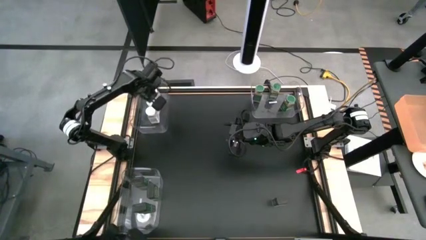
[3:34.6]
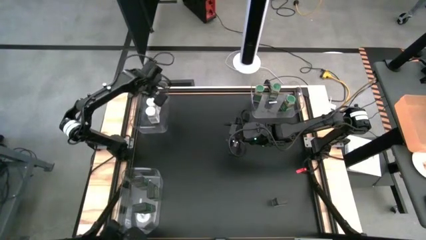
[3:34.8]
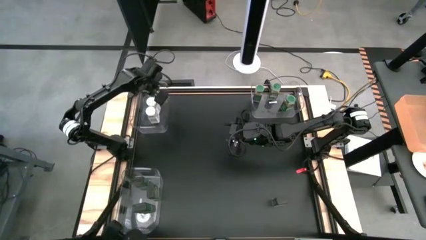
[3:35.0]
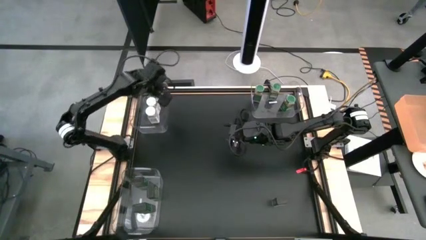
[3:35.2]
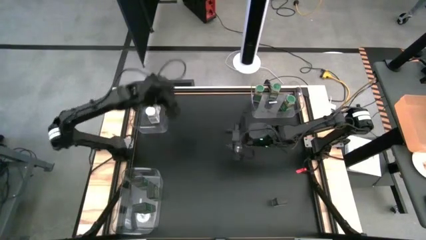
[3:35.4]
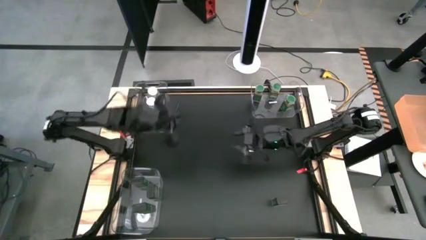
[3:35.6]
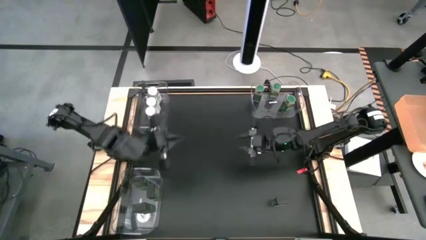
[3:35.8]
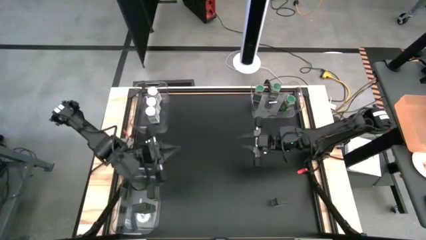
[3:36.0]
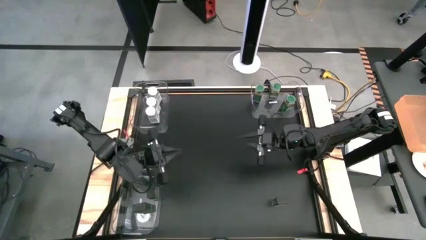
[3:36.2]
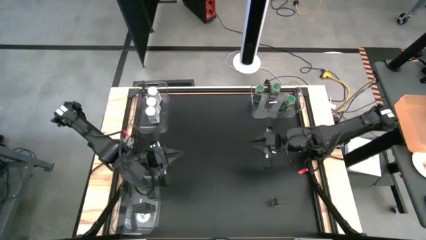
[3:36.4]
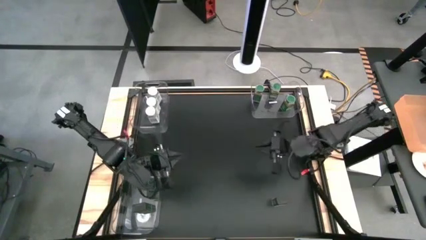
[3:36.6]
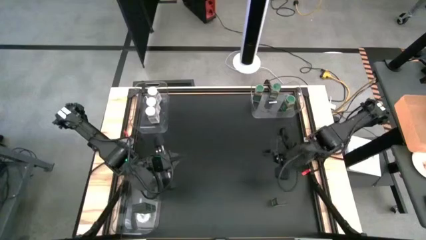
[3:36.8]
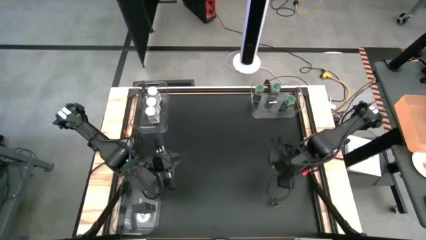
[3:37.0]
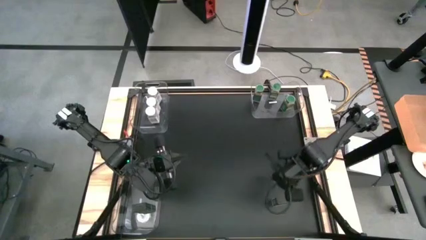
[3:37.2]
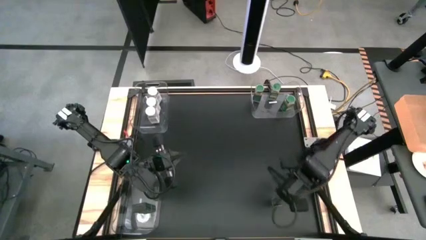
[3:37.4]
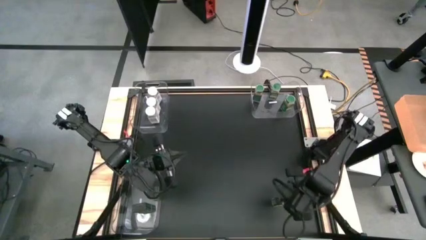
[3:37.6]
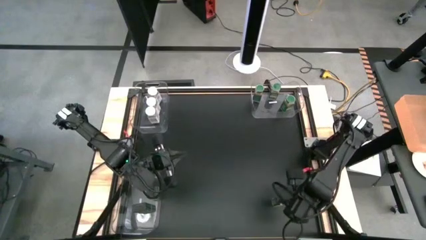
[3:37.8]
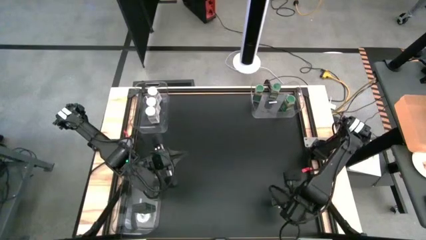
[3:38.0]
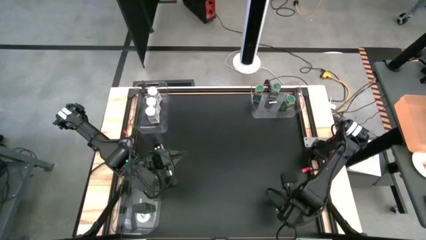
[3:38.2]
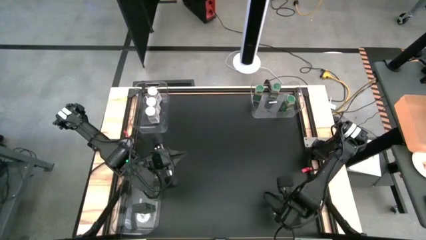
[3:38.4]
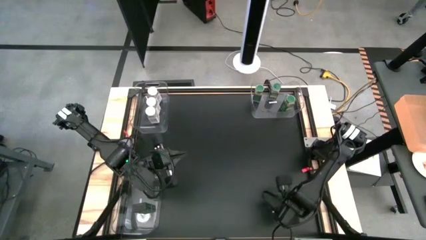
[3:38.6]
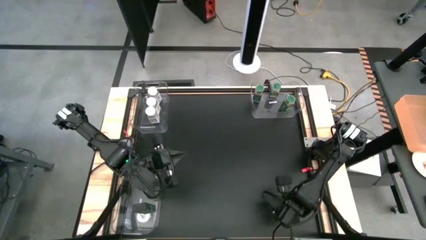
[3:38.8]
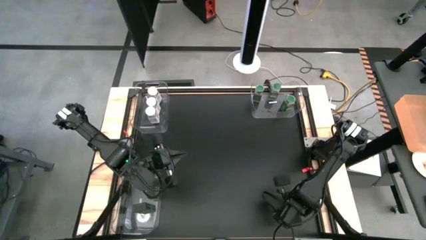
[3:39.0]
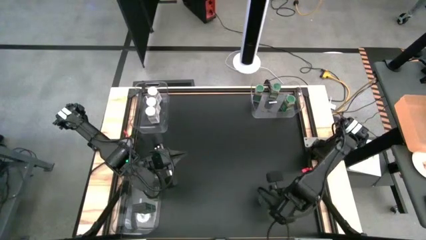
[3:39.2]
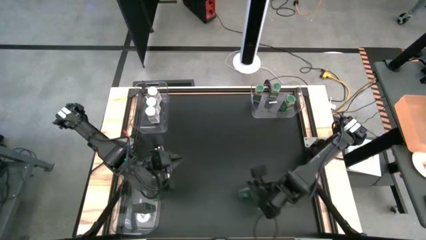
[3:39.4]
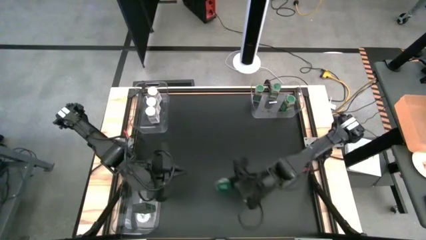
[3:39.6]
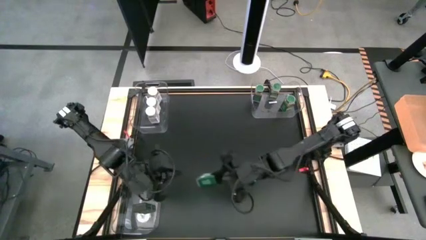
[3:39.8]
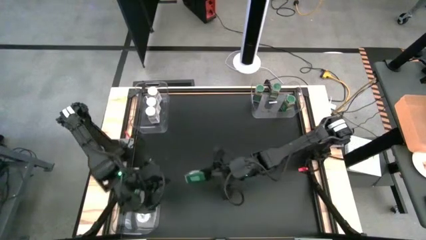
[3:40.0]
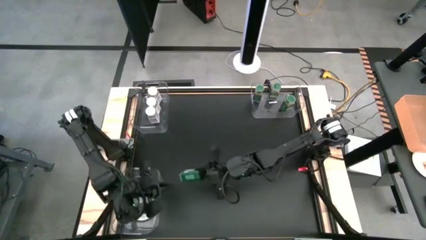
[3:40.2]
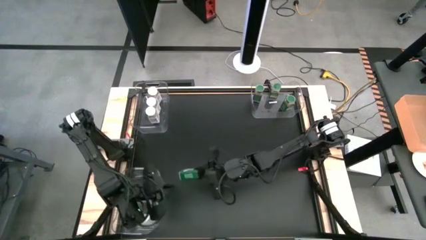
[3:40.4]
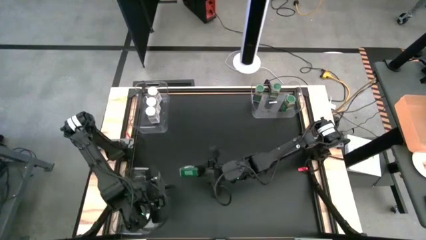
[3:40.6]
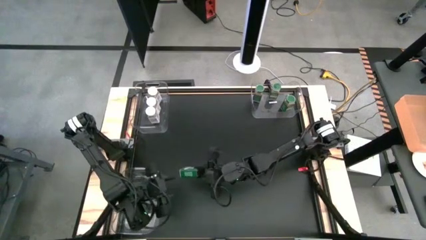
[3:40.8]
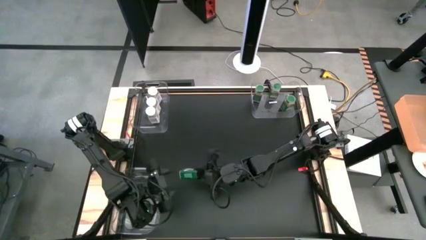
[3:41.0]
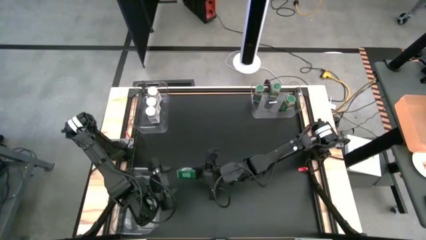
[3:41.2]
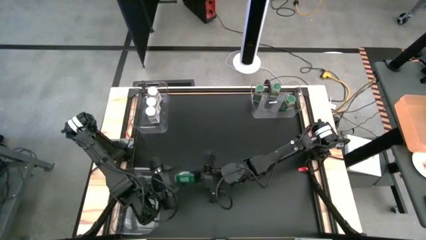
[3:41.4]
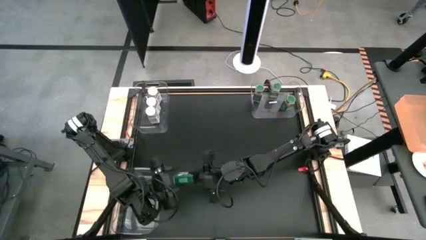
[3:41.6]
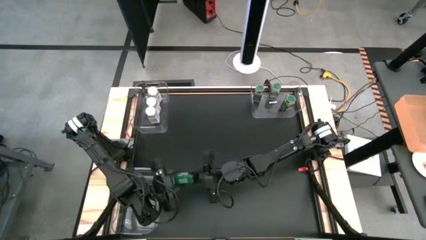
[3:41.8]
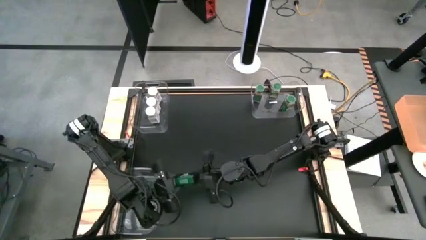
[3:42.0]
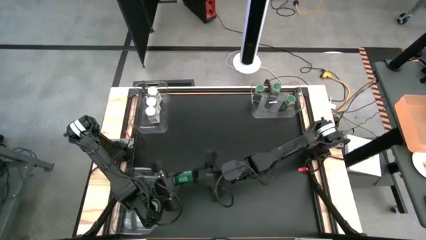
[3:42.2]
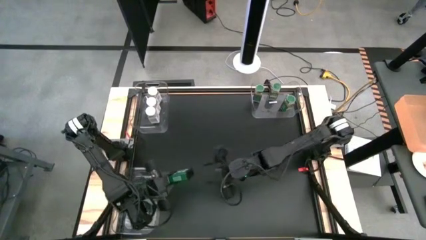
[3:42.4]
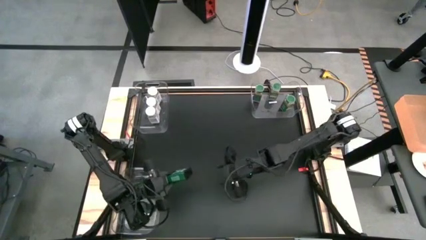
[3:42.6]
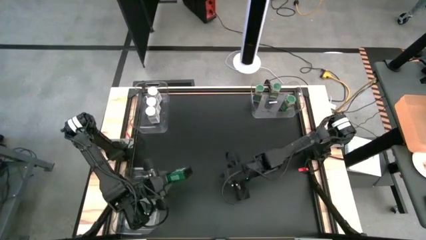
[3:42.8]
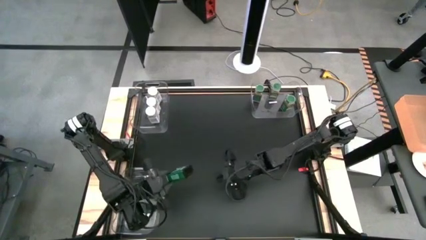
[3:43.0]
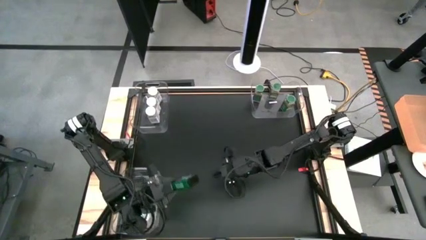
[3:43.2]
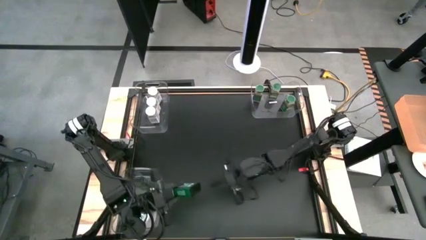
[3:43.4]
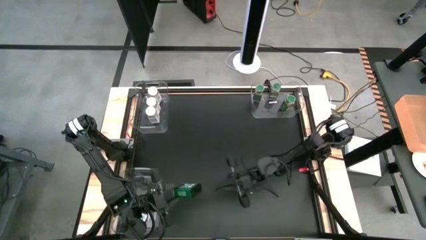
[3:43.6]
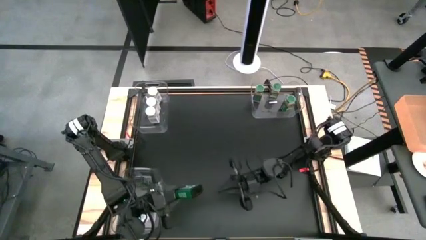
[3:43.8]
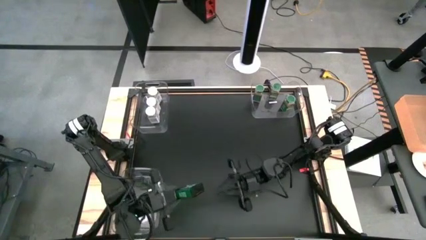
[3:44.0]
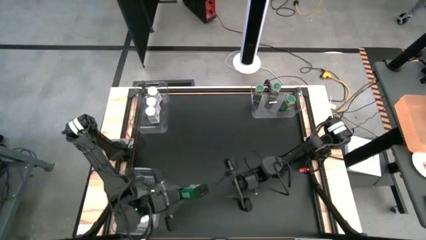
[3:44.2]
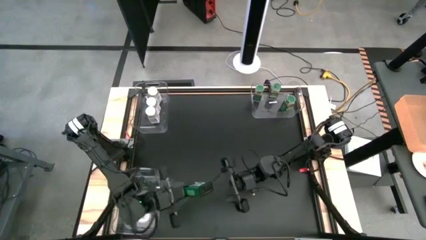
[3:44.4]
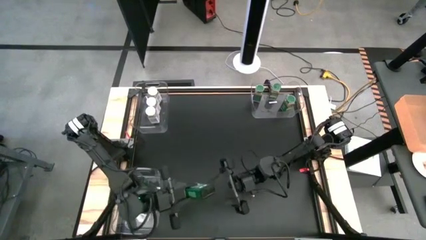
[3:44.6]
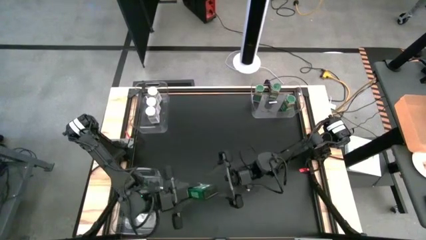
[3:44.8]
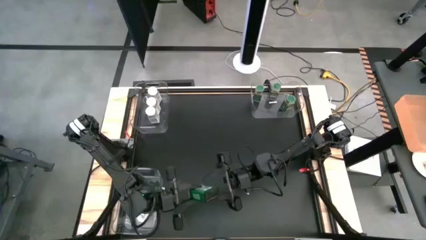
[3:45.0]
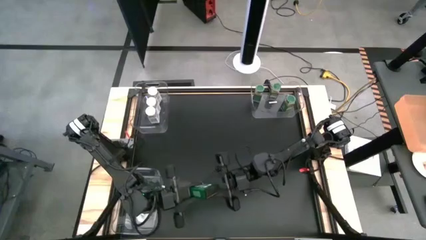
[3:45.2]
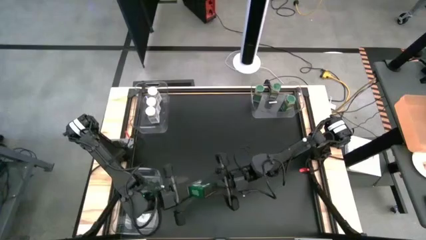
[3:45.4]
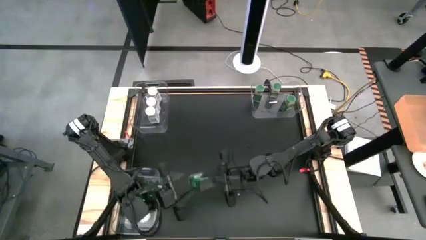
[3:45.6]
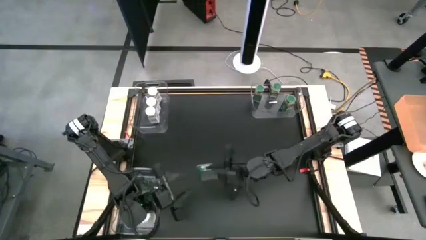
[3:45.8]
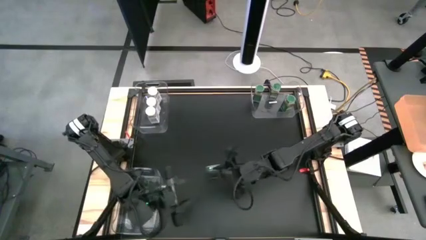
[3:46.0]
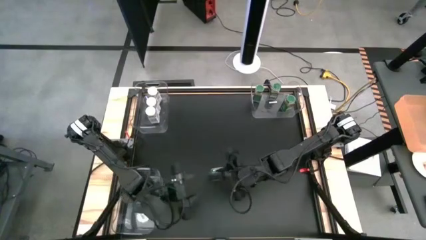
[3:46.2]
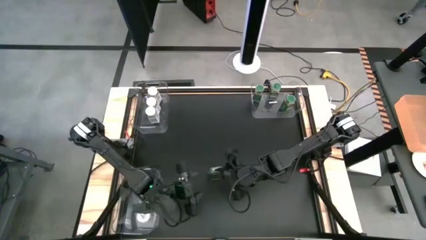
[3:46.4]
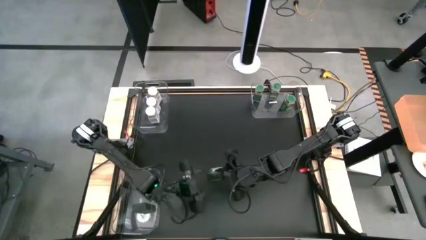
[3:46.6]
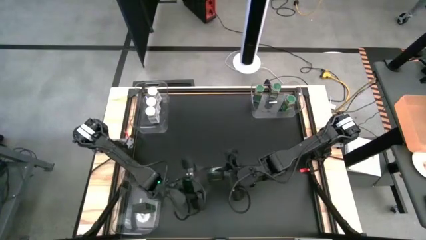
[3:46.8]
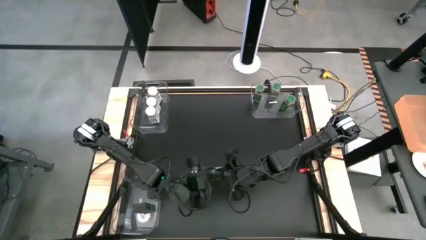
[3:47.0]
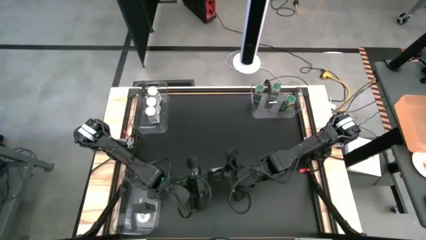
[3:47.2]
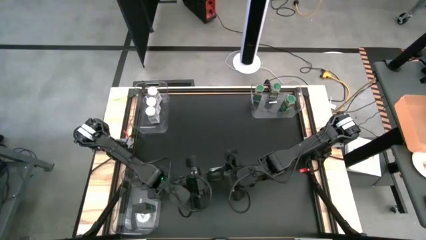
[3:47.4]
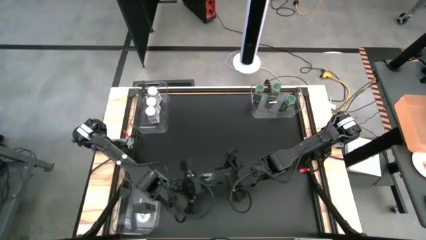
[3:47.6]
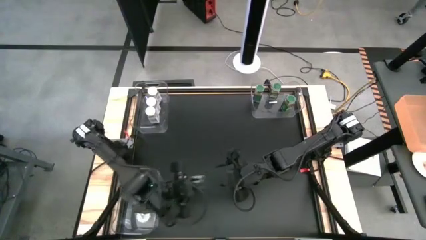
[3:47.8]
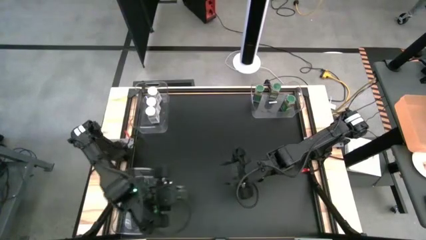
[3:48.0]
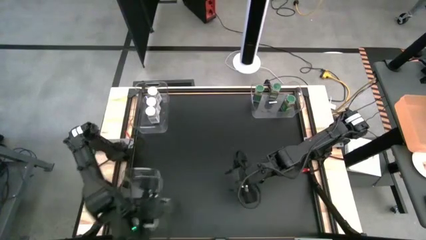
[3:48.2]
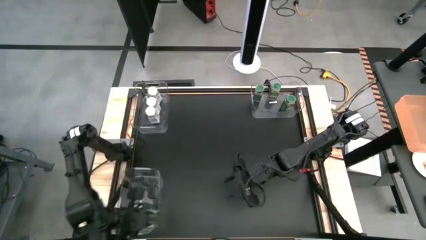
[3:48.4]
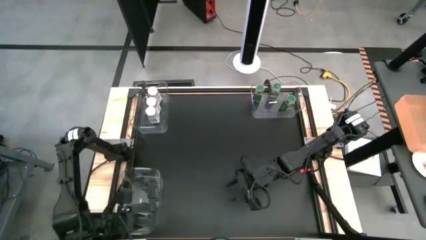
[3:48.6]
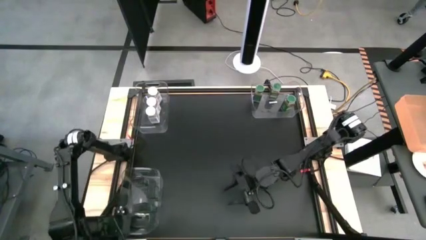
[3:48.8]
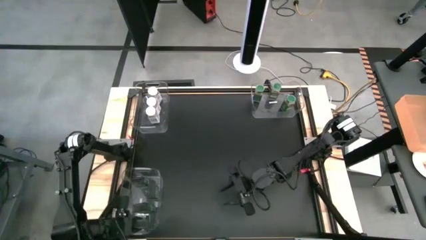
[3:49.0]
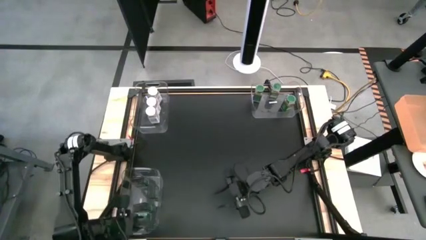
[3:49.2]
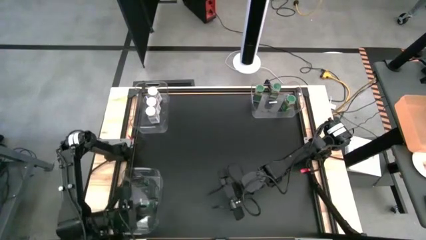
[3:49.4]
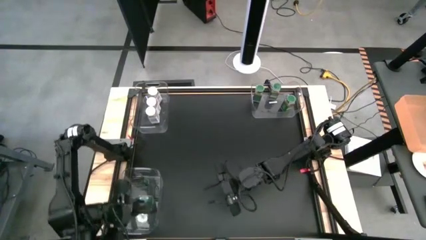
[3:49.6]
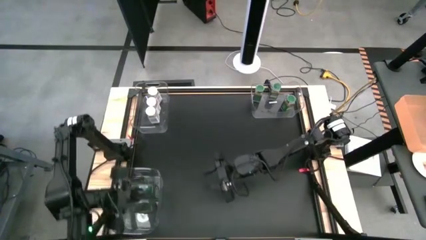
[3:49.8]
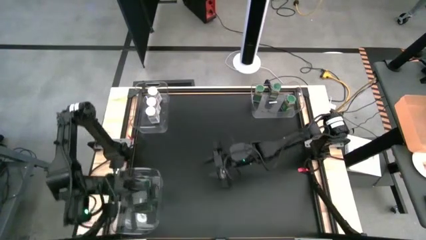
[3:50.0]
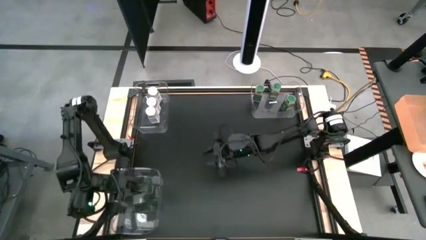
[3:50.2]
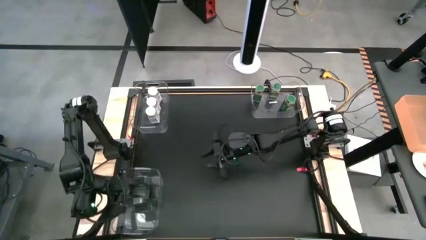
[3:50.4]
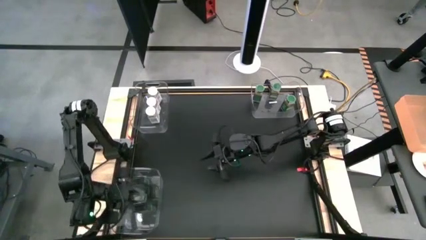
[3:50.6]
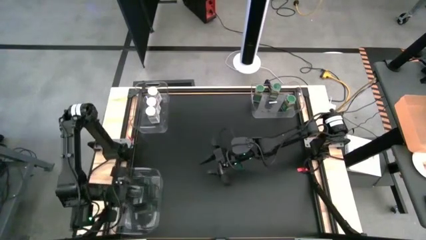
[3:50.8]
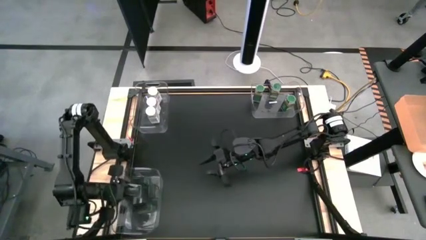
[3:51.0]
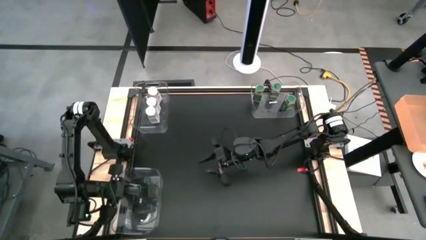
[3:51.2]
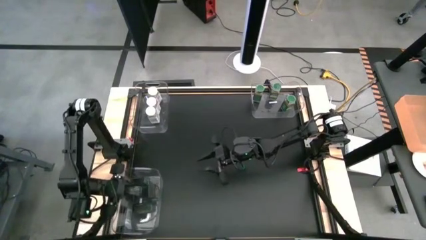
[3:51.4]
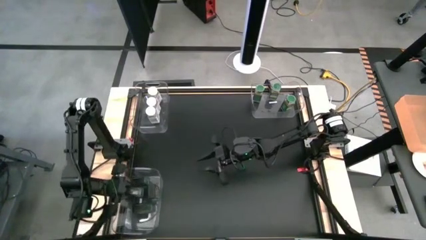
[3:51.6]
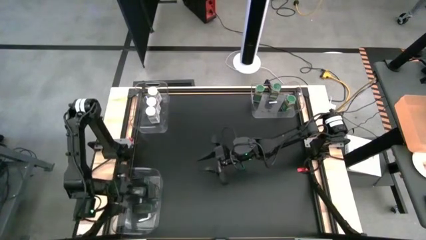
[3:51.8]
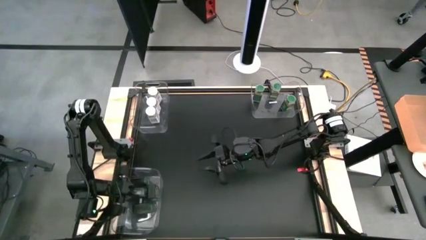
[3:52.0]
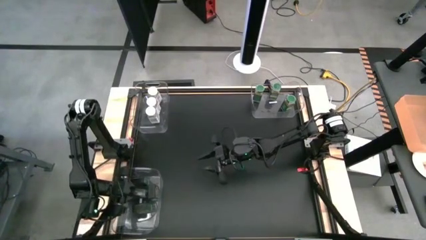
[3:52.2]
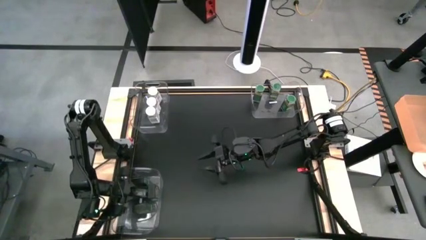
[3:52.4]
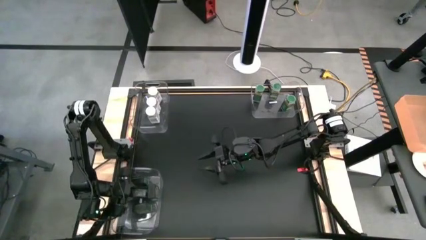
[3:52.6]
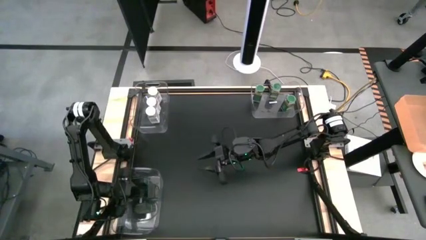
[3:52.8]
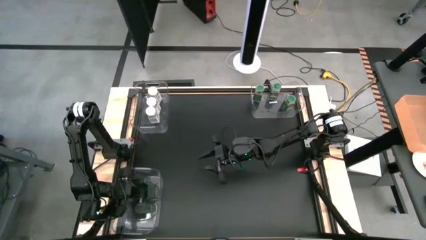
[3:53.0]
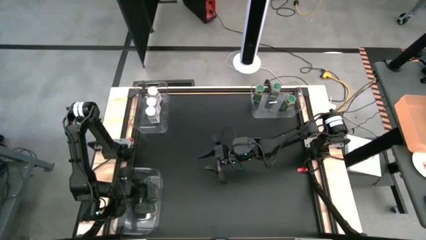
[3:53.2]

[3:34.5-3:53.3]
Task: Sort spices by type
Put the black seasoning can into the bottom left transparent bin
